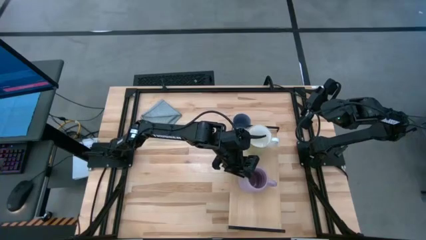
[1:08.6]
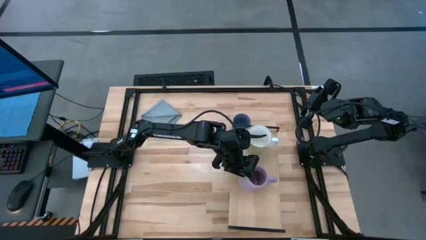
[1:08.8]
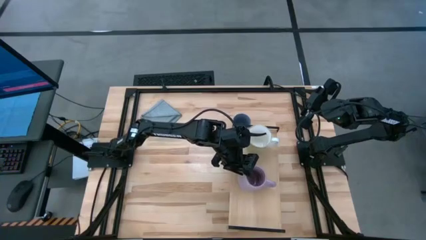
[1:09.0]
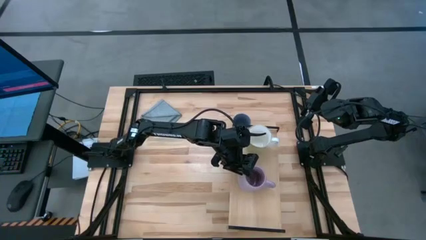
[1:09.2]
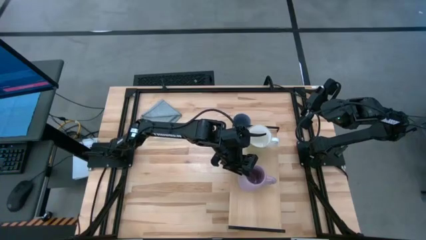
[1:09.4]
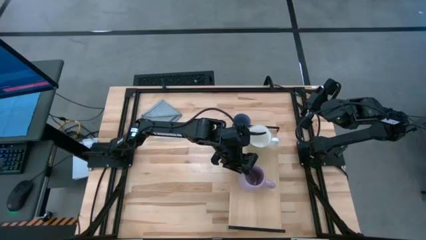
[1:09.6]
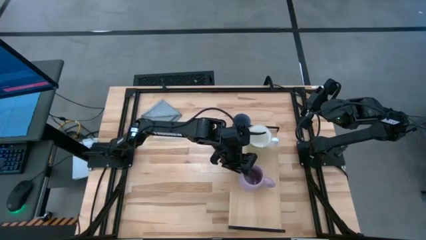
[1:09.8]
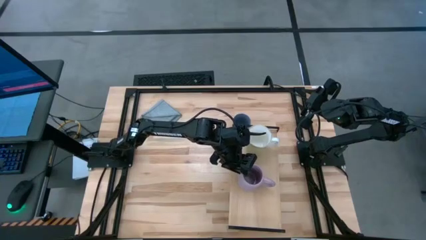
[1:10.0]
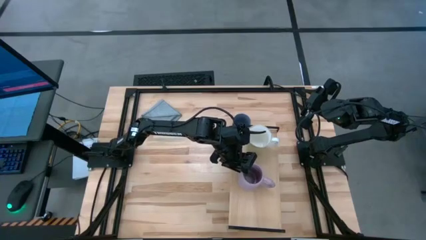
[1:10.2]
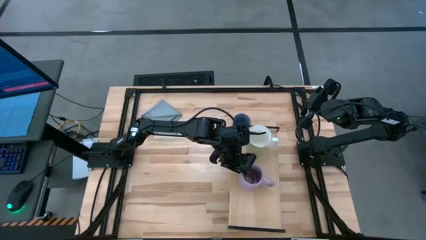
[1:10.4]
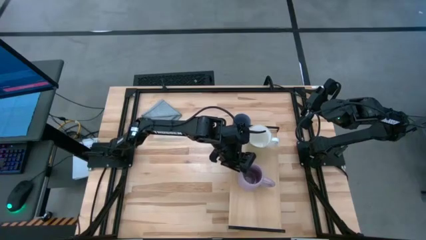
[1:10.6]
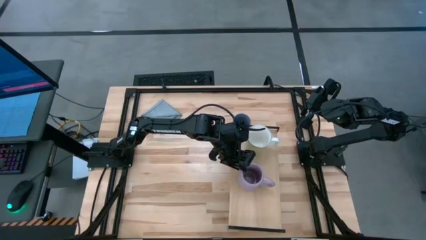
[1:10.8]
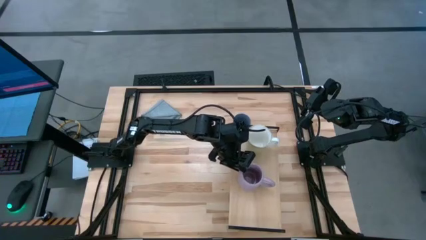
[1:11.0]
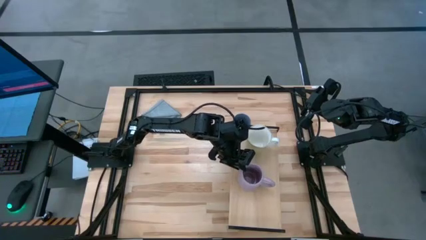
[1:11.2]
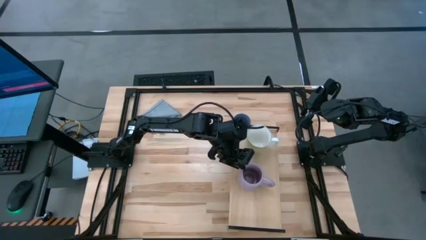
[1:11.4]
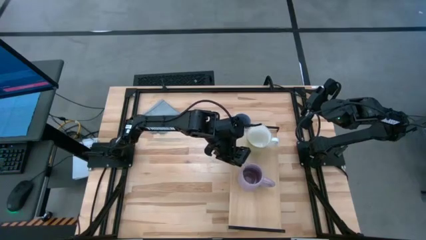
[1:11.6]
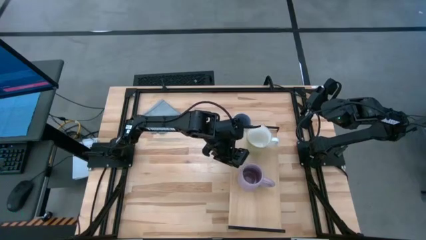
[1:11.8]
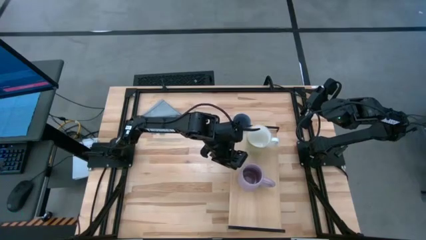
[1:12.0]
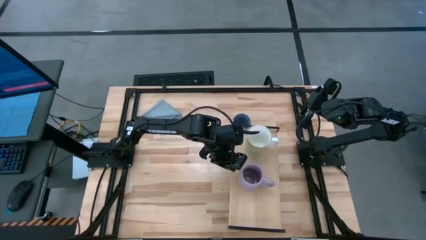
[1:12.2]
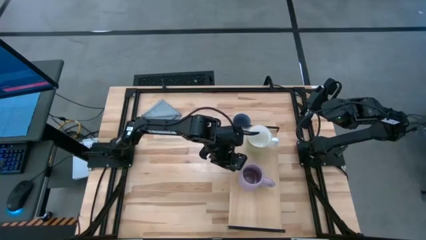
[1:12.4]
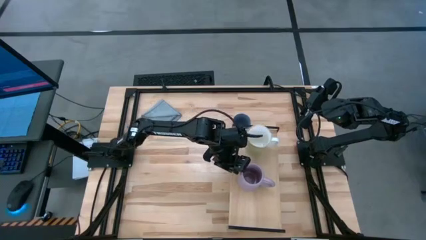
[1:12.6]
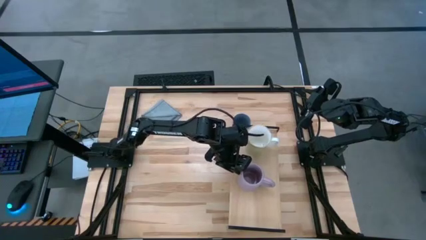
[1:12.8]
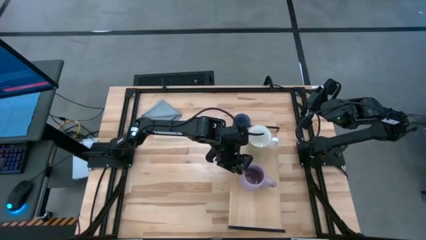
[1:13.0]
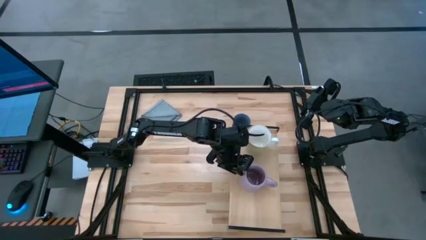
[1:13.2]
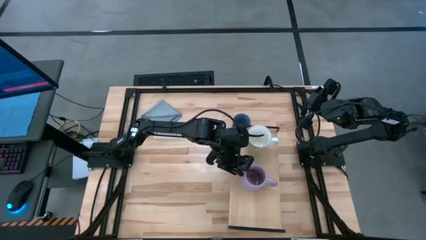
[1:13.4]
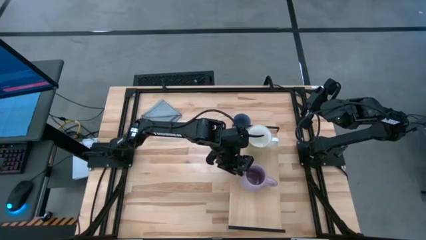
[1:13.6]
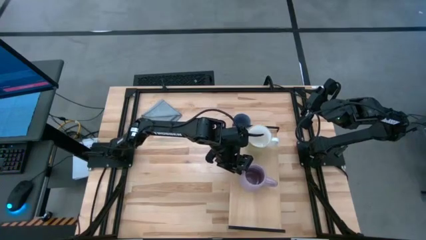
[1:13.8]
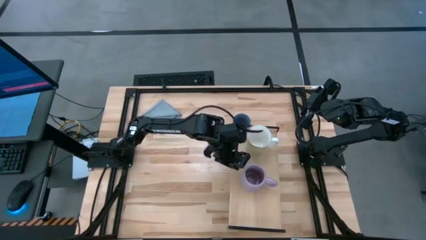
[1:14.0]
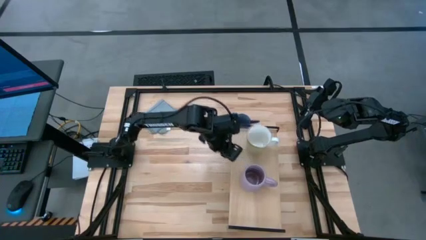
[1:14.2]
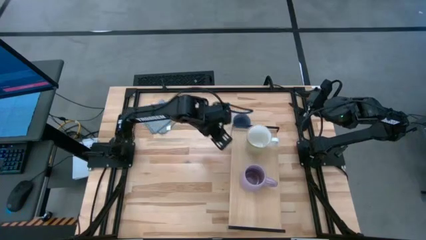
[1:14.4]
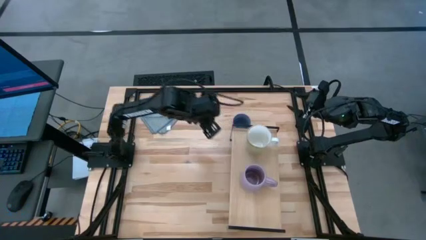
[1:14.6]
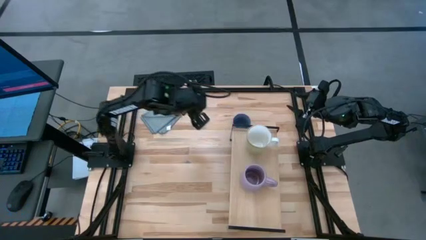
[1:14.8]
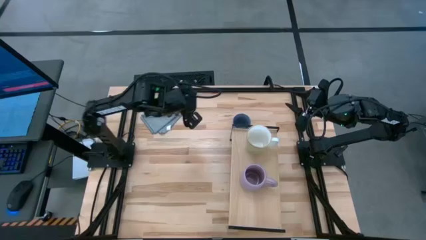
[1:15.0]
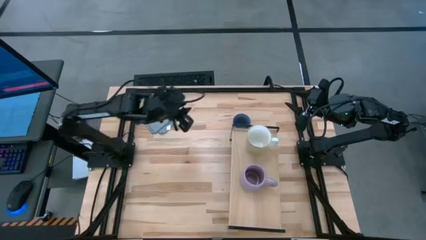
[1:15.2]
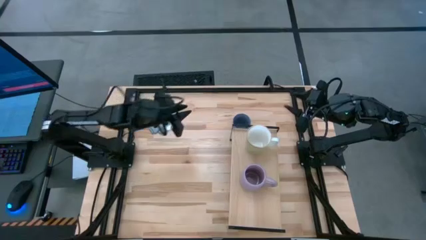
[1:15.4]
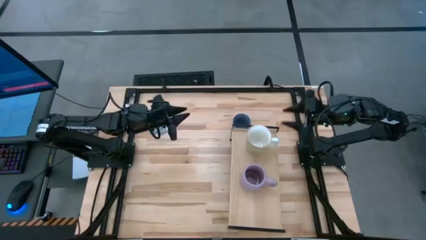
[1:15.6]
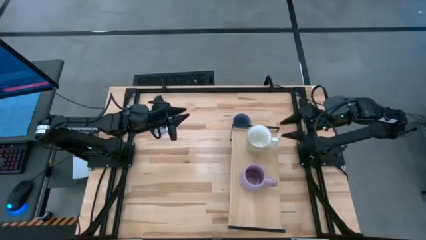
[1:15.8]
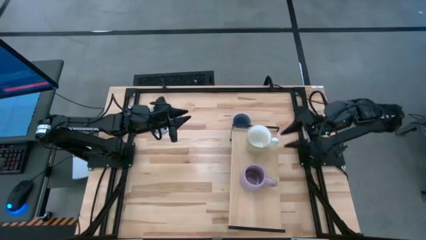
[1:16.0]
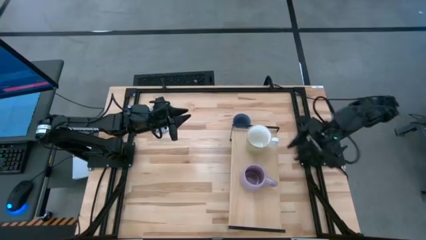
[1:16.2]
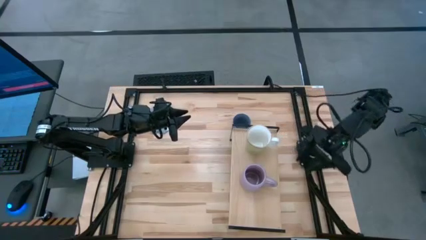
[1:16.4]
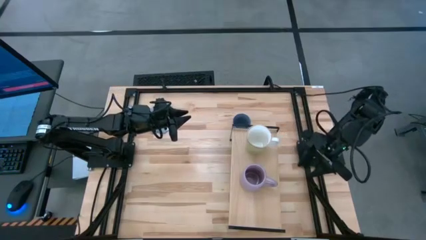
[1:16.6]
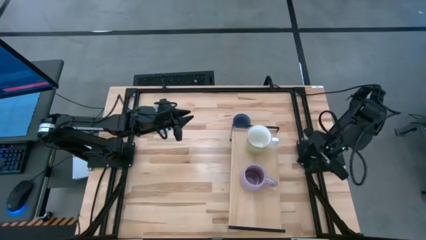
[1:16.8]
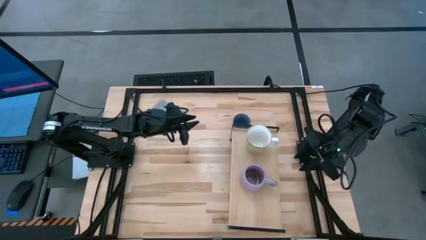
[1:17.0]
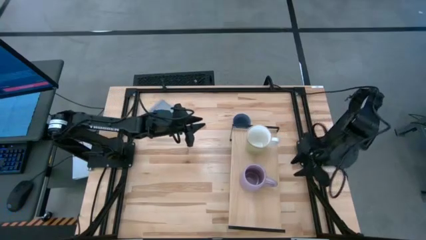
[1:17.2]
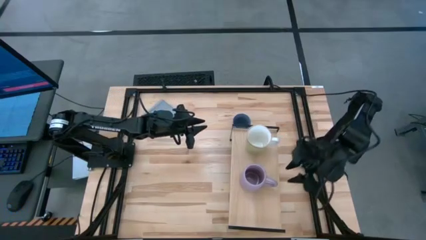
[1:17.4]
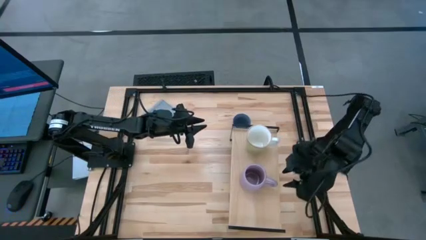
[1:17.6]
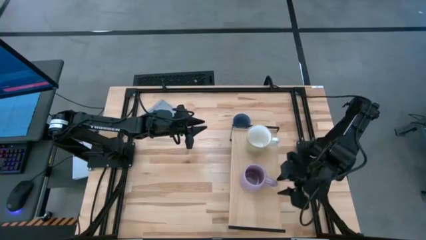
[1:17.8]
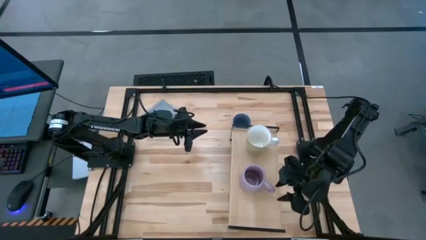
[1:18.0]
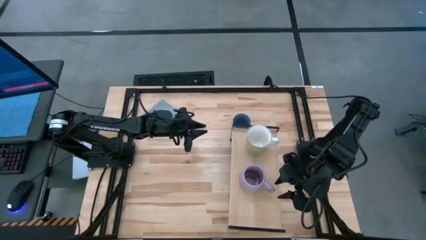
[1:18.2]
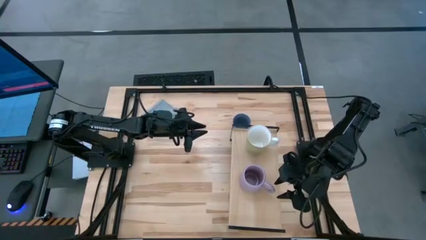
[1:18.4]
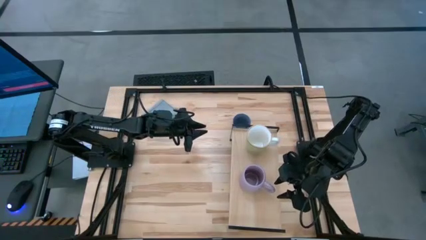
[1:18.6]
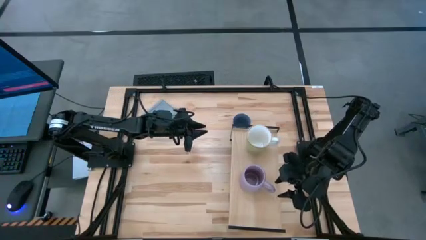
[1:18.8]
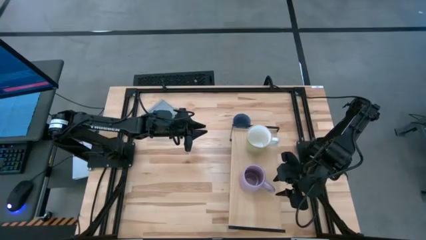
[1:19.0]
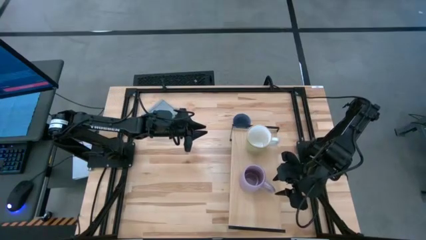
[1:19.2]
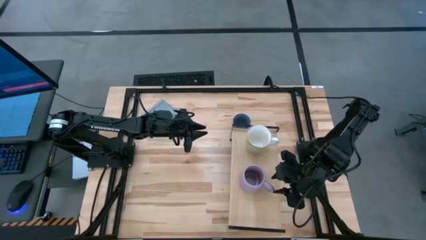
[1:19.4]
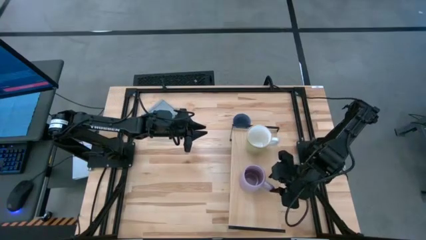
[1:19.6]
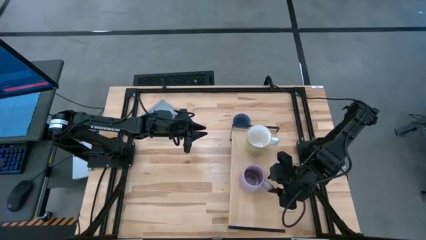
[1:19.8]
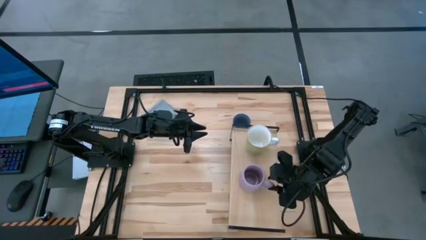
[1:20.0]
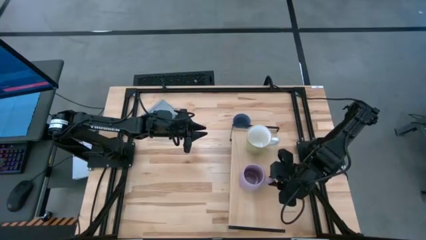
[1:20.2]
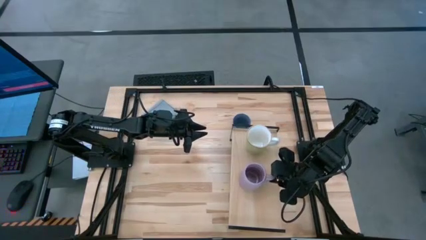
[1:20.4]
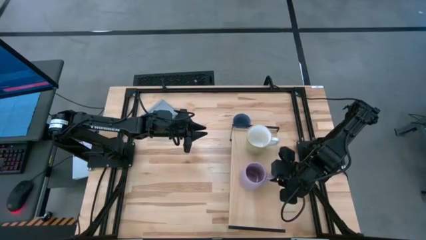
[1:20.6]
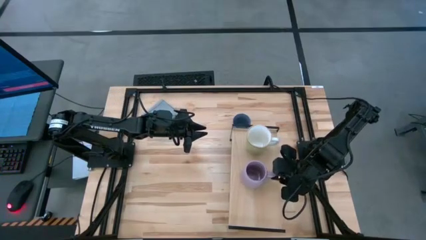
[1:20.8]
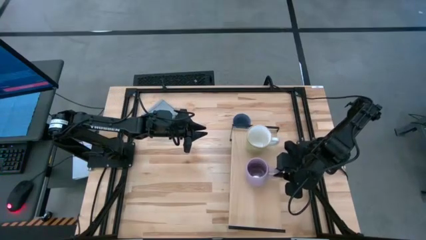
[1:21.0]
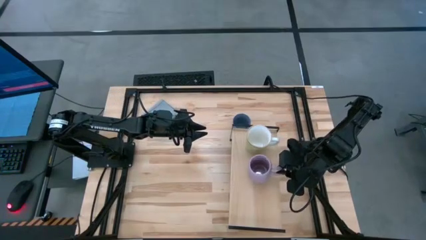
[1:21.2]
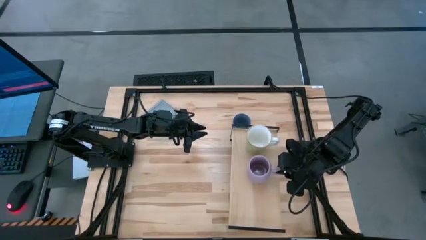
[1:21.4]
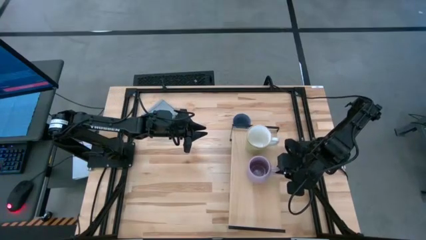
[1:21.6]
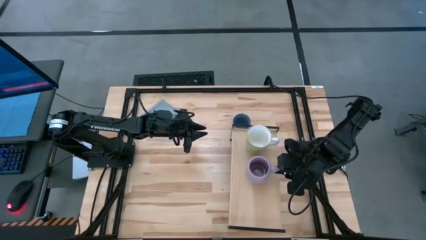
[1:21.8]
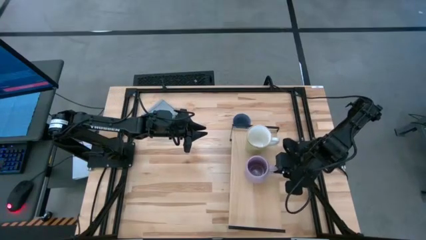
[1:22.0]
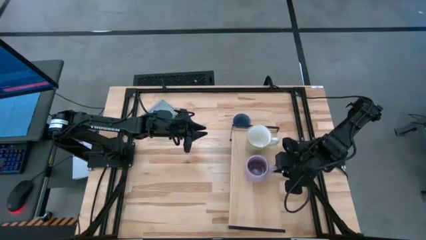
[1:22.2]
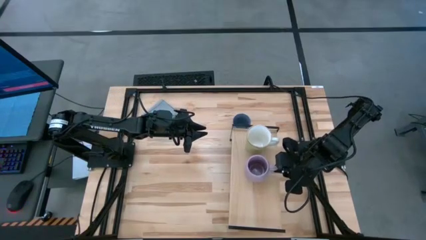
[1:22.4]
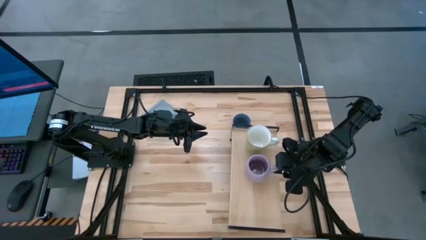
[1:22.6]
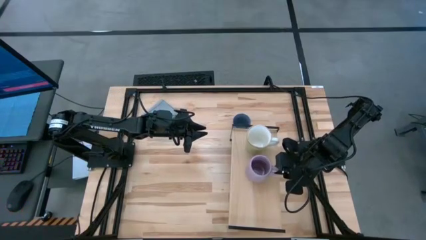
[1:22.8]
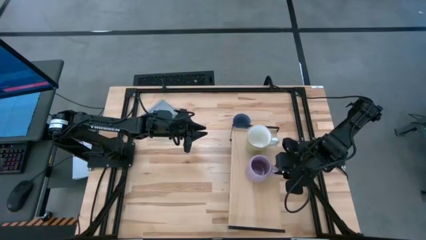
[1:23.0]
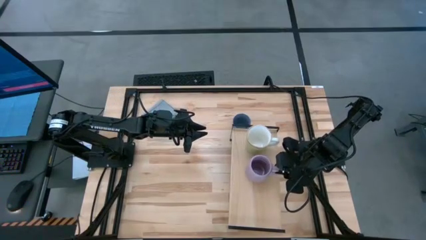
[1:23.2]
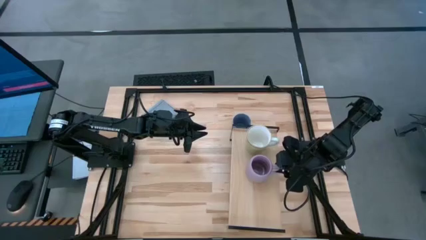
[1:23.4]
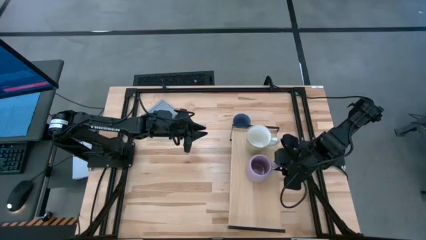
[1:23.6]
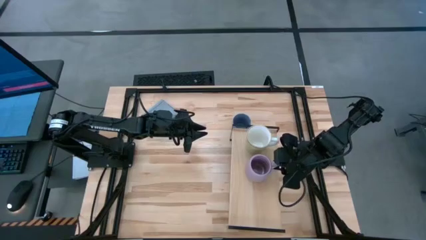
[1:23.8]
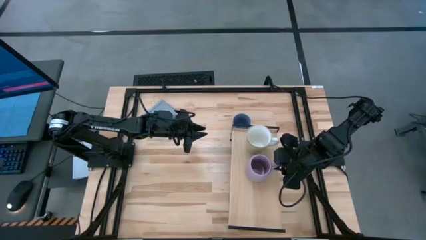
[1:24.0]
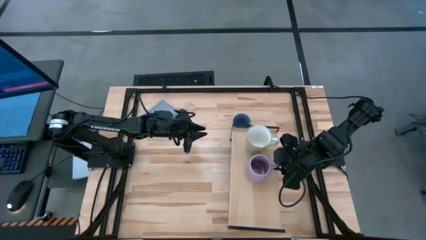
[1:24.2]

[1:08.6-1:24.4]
Task: Stack small to large cups/mugs on shelf
Put the violet mug on the shelf
